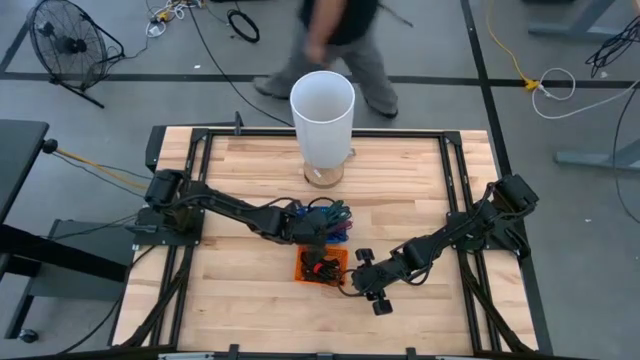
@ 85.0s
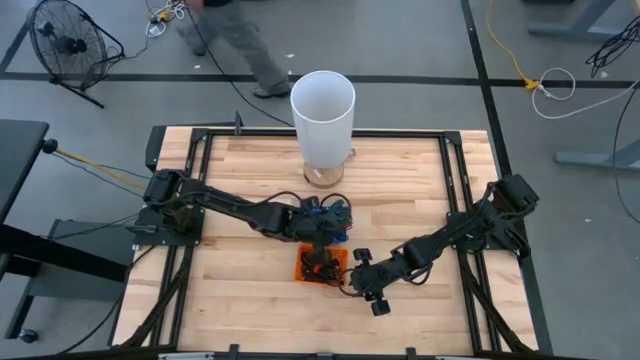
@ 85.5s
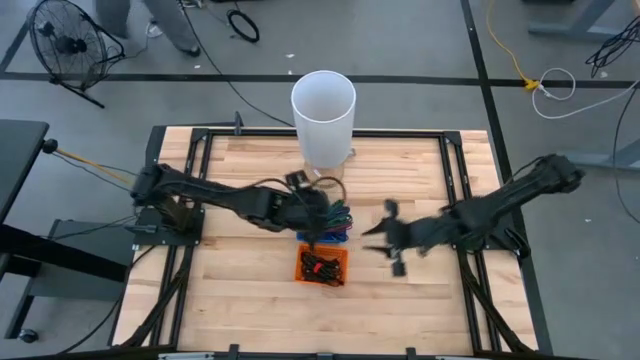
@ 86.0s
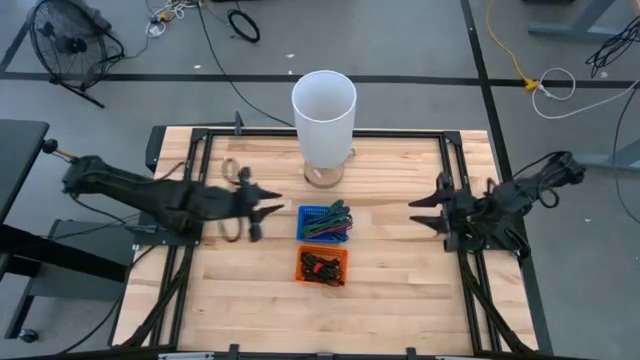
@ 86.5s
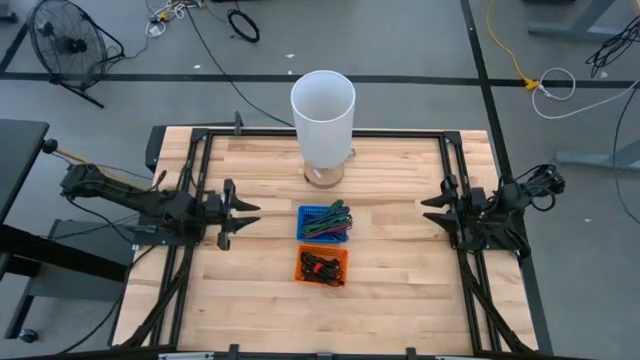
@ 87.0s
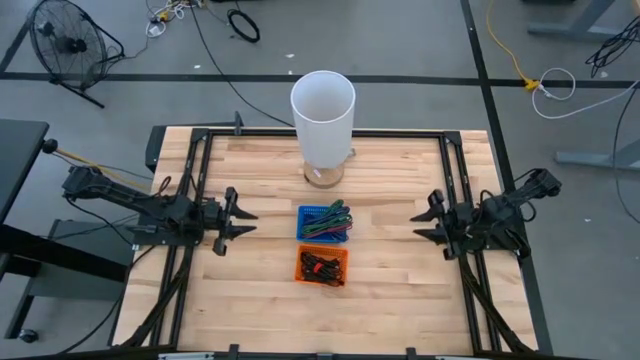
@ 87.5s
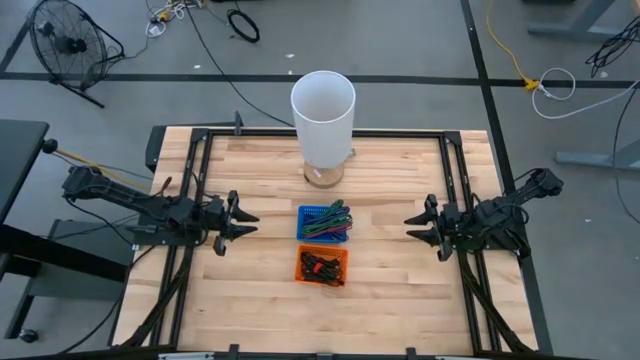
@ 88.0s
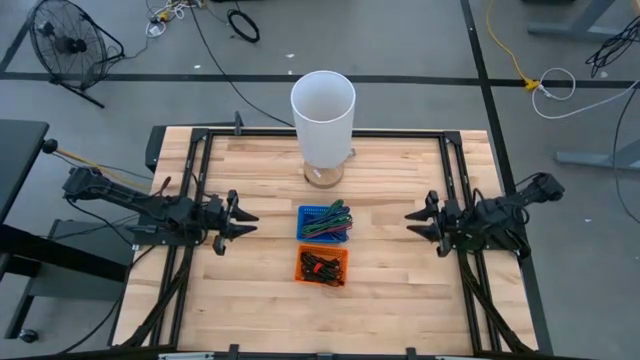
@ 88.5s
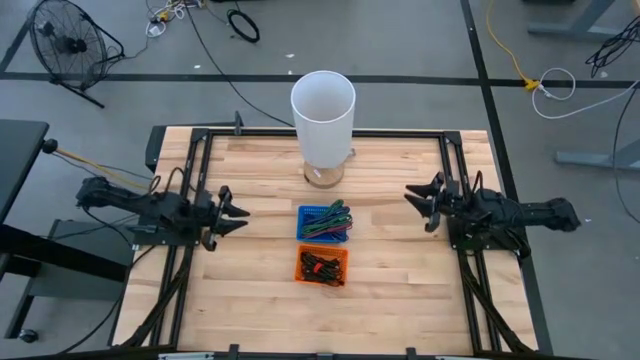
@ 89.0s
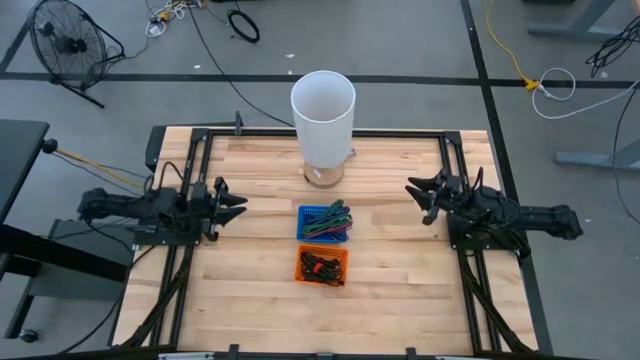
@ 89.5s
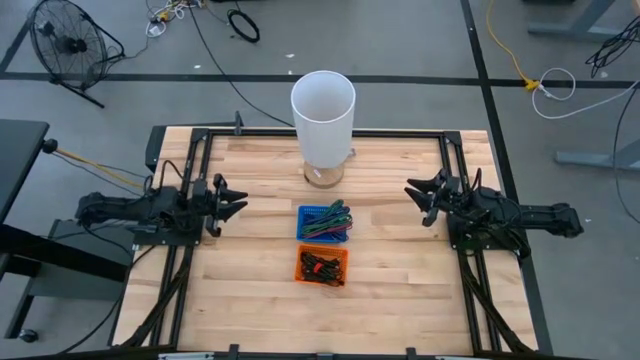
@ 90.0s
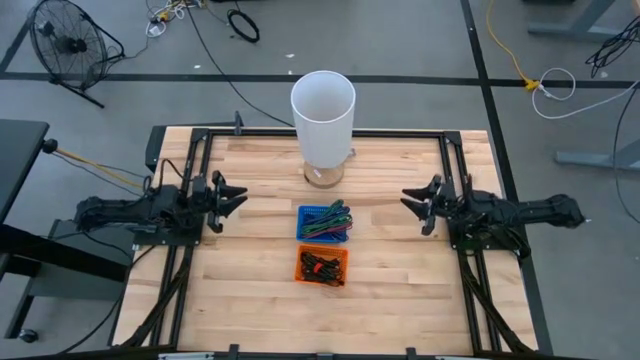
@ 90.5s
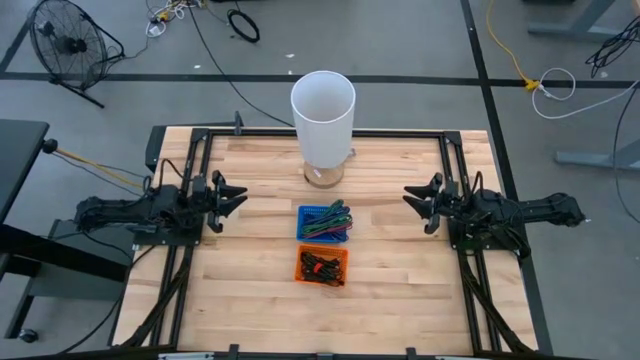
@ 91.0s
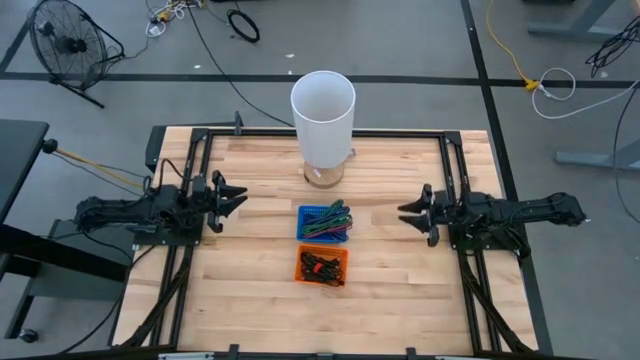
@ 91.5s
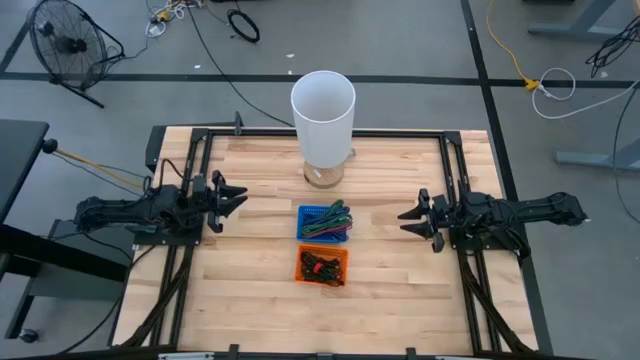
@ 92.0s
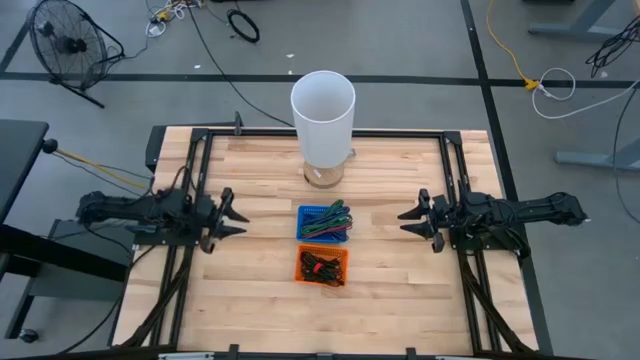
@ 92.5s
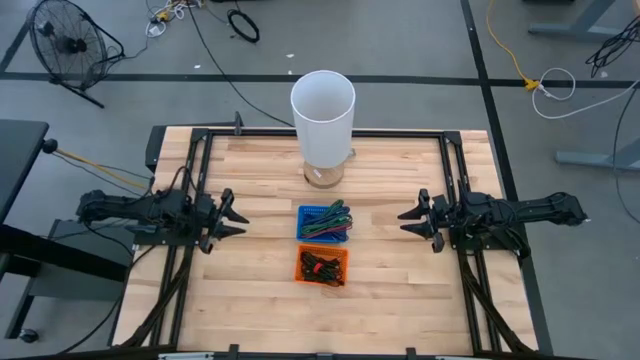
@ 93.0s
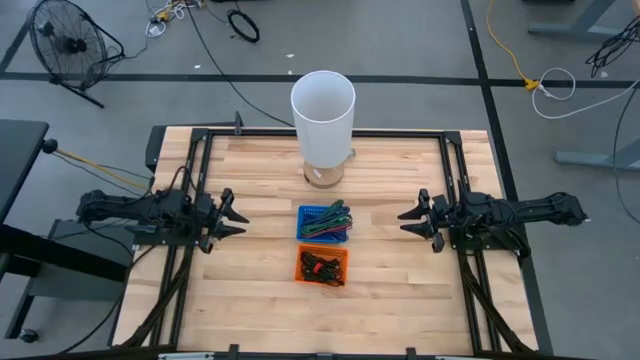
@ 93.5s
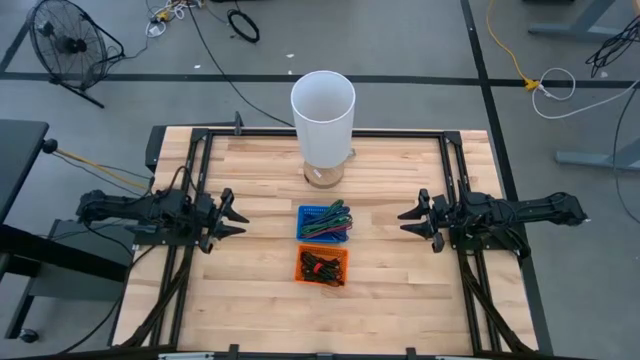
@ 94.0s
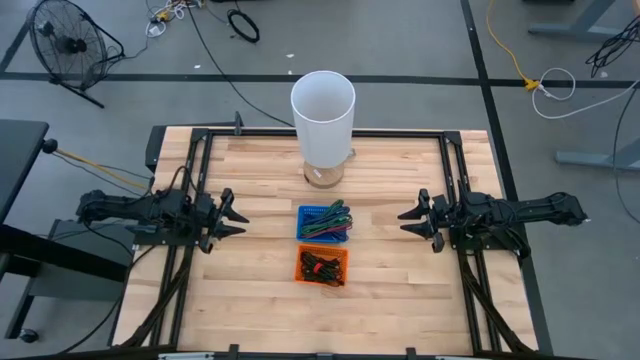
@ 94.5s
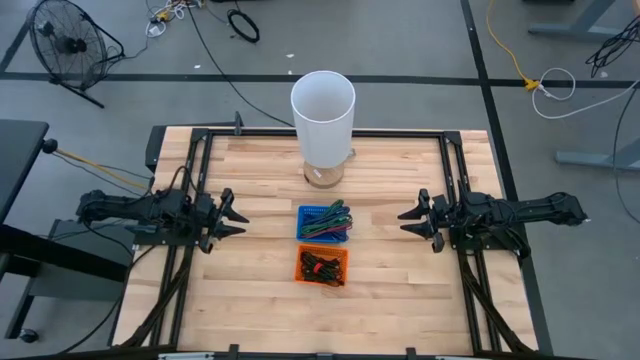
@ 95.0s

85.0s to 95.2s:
Task: Pick & Place USB Port
Return to Home Position

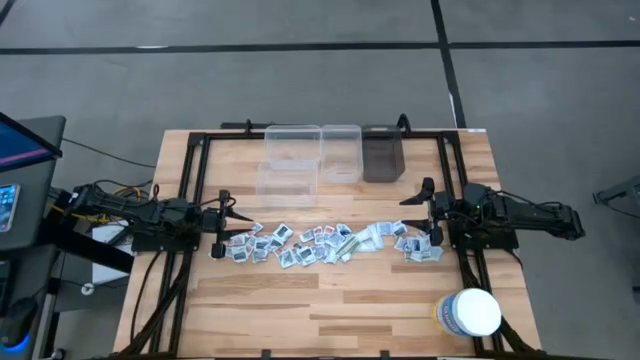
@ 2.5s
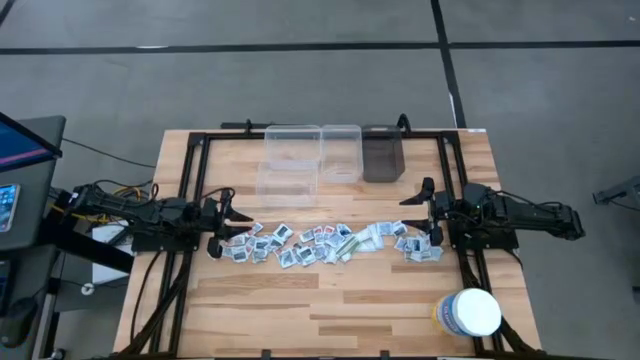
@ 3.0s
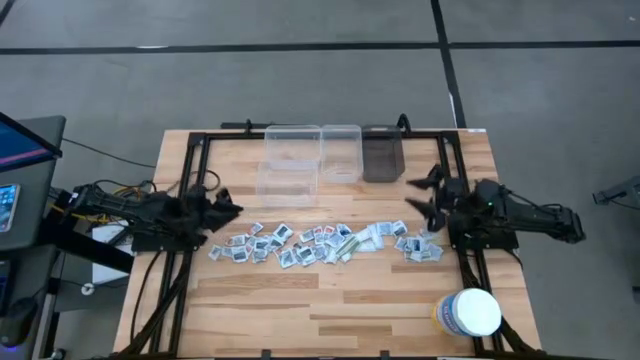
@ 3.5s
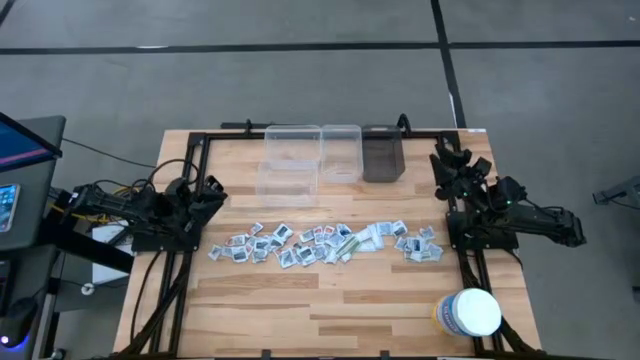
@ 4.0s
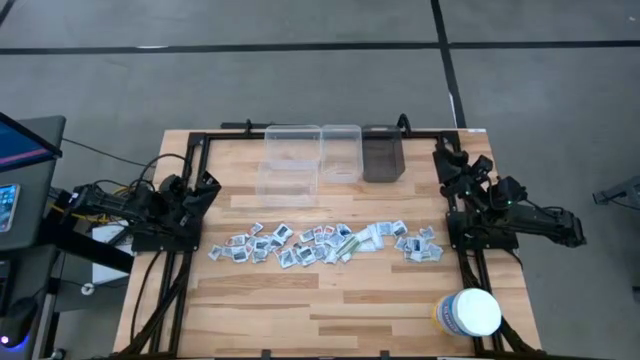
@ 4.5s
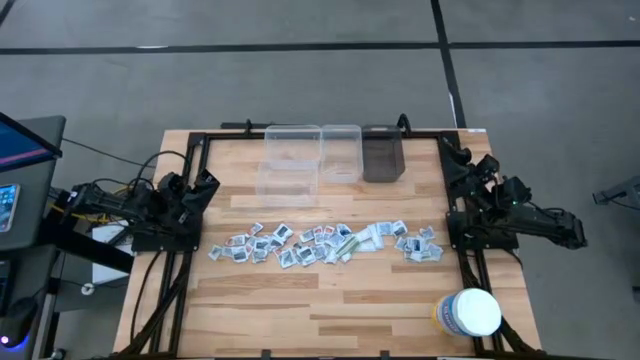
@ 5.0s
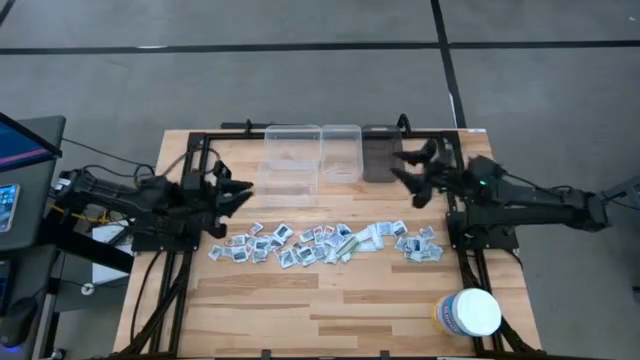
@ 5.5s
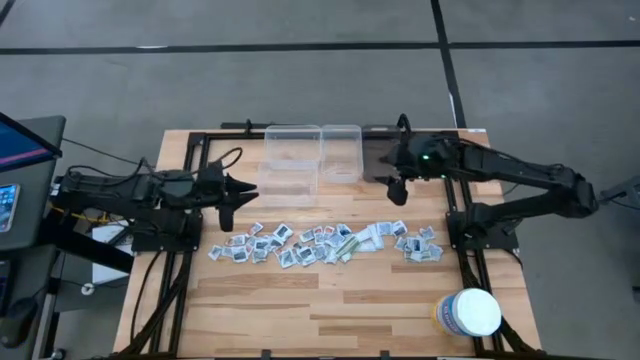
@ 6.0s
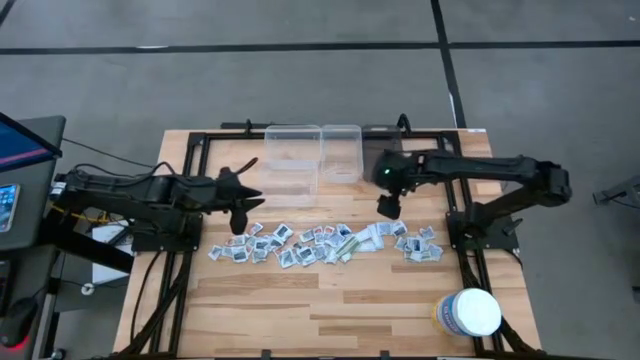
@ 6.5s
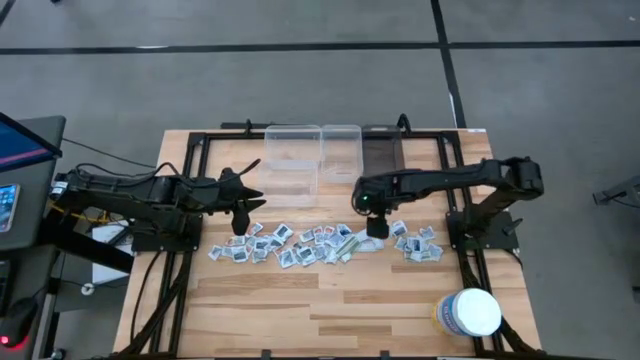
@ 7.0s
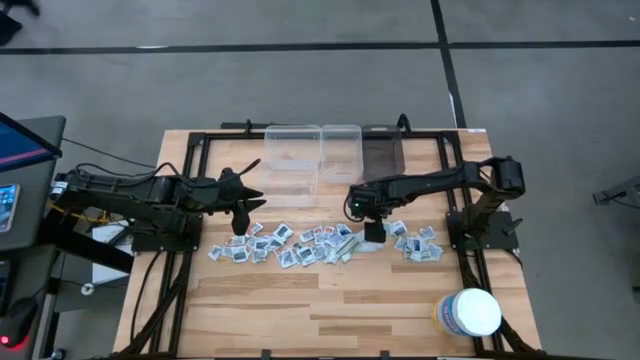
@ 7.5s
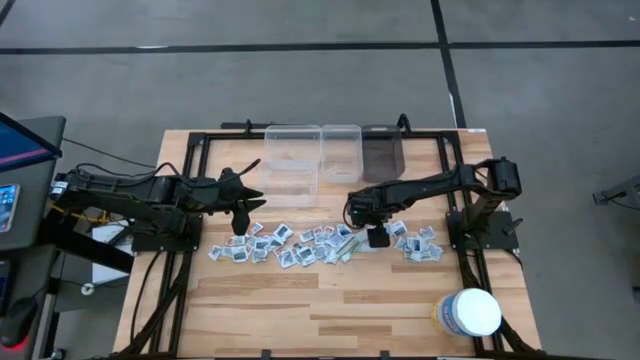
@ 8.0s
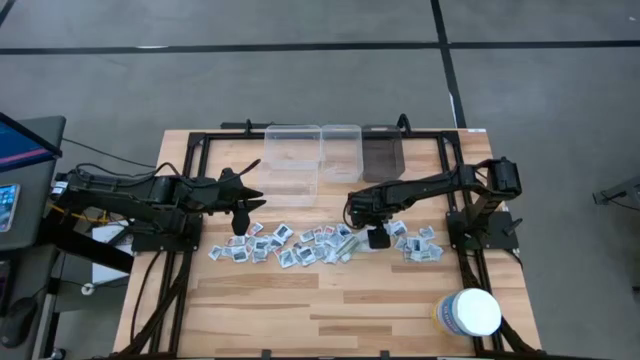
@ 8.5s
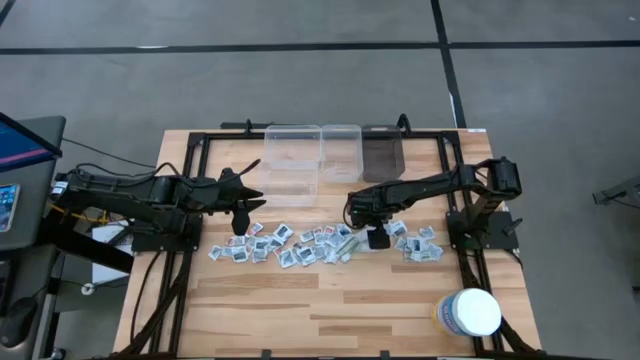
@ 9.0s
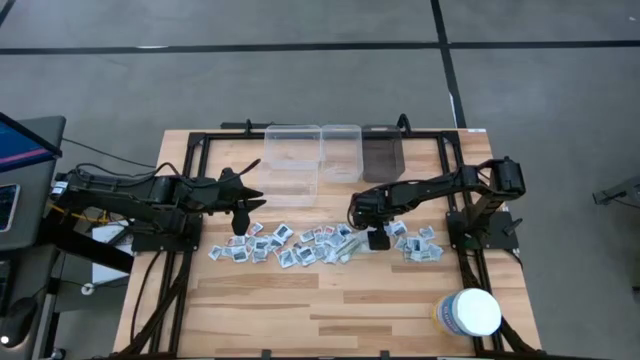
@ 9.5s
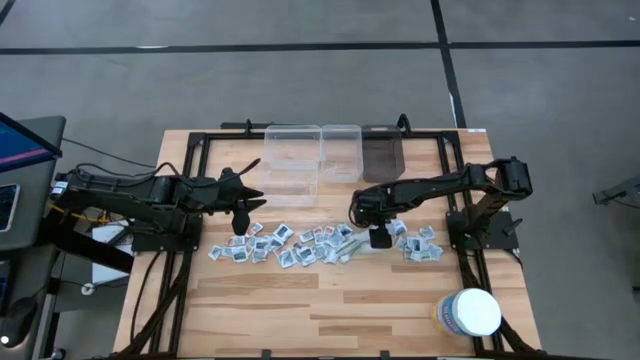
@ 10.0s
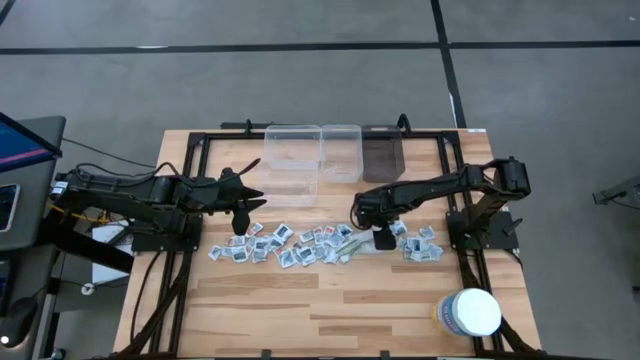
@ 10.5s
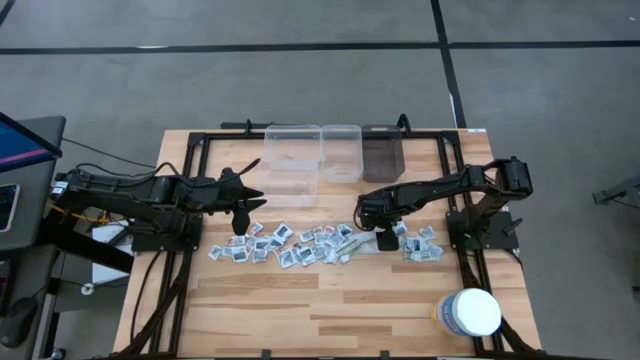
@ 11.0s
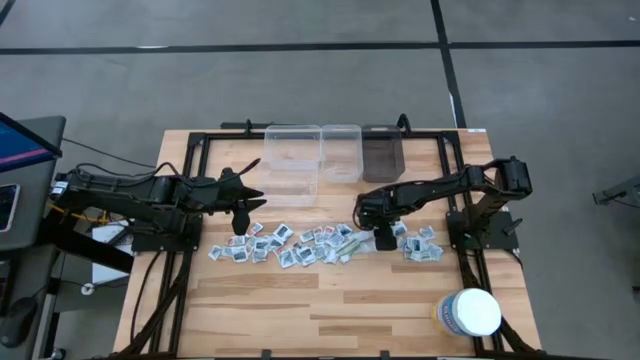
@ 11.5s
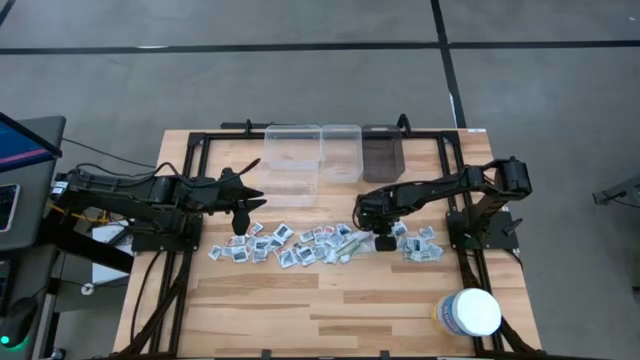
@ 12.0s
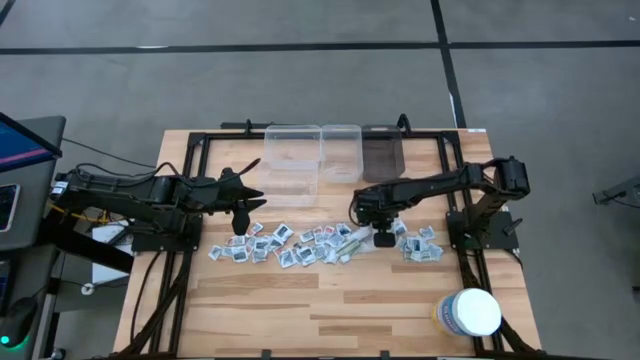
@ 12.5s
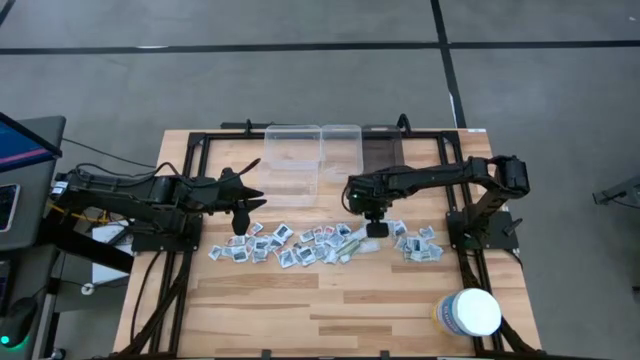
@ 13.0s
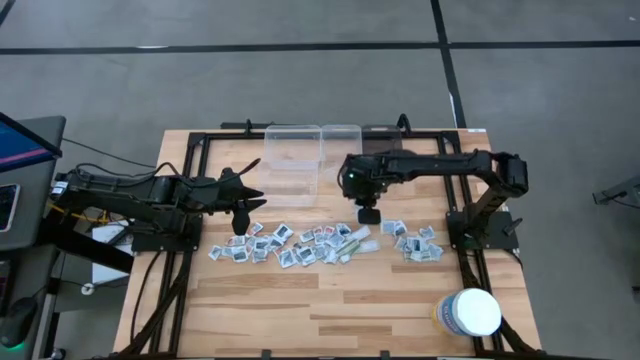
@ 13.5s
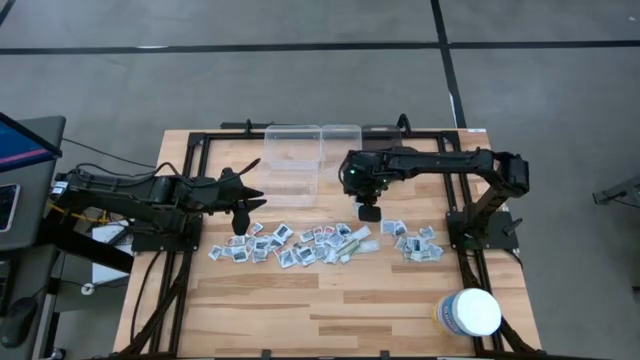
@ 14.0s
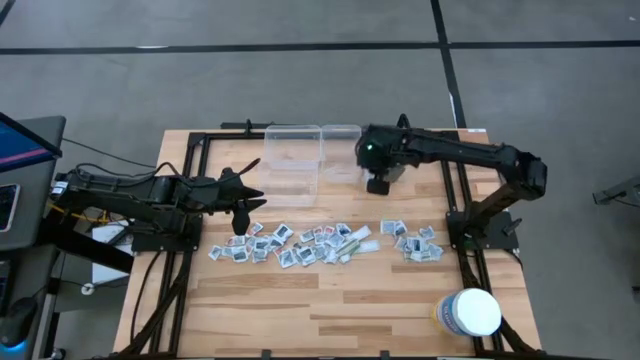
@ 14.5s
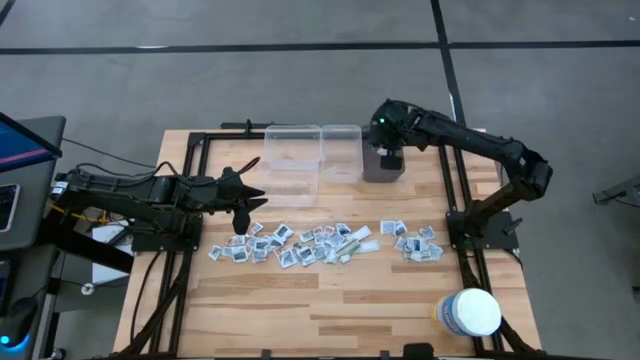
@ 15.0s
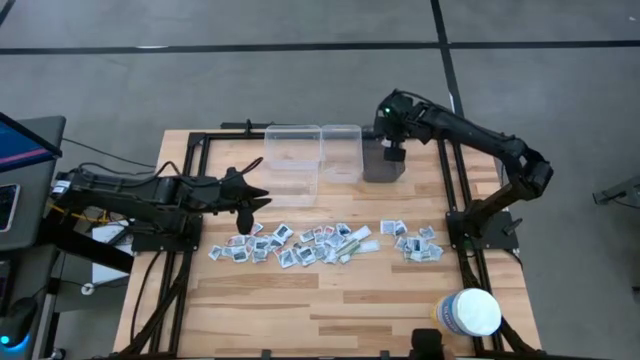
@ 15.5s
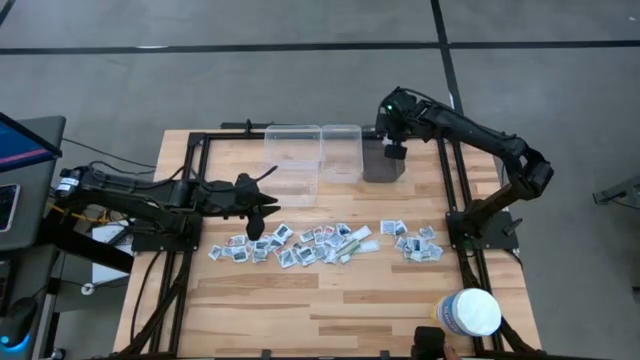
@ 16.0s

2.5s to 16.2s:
Task: Pick & Place First Aid Supplies
Put the bandage pack into the black transparent bin
